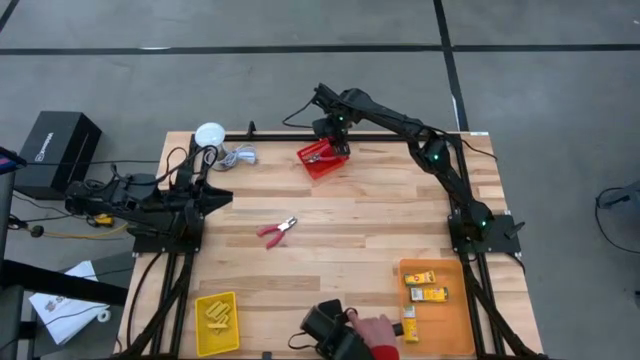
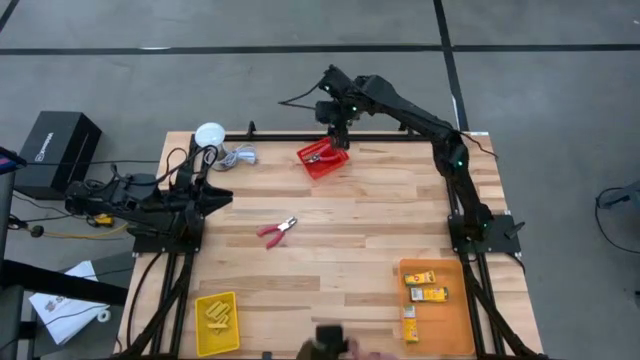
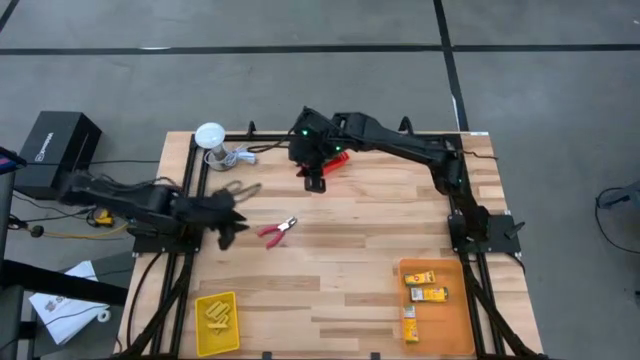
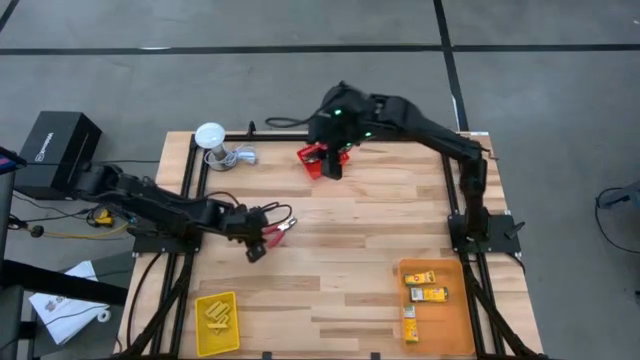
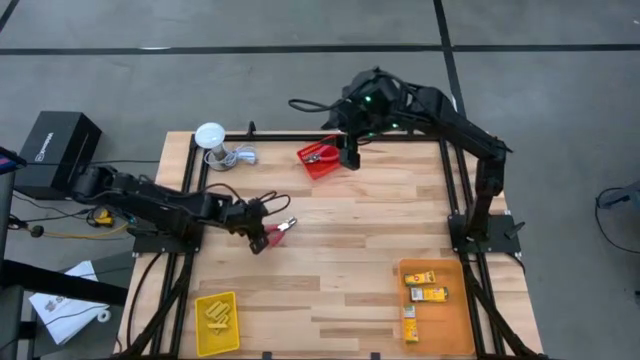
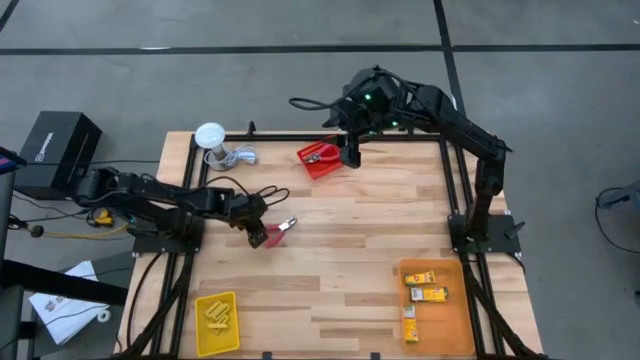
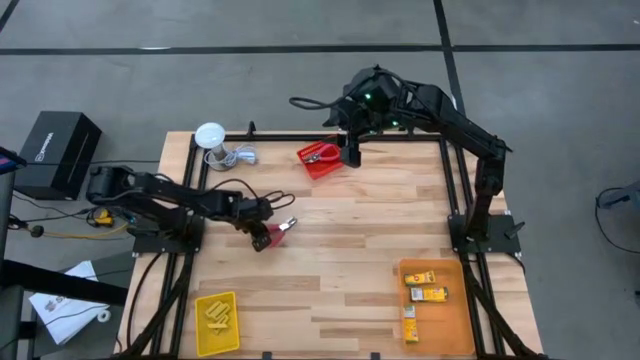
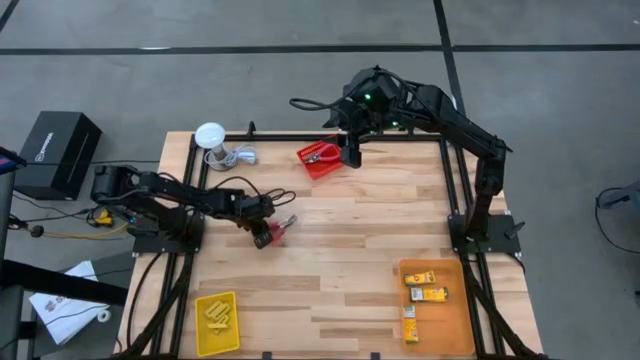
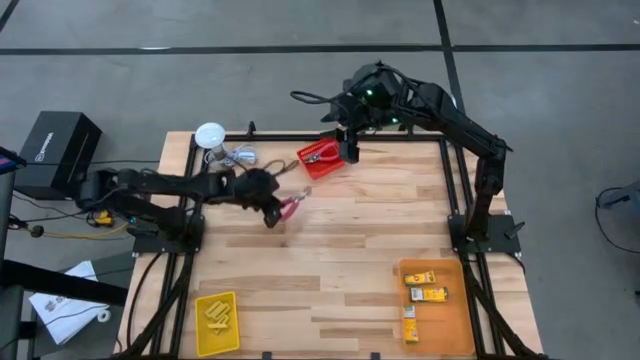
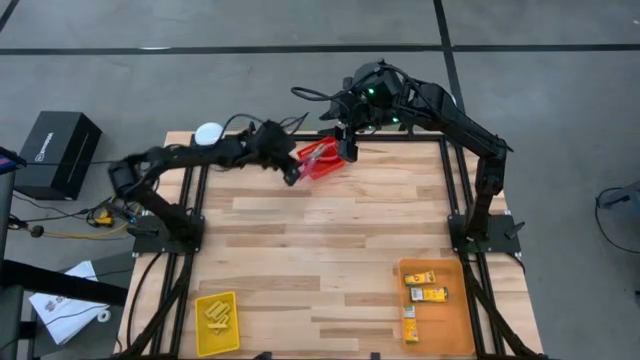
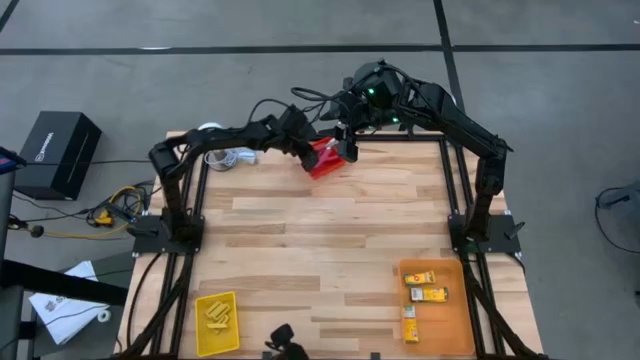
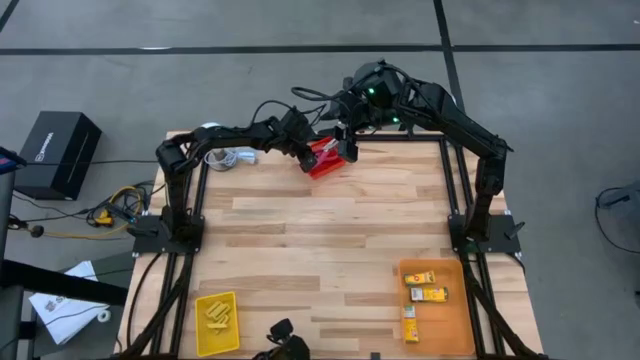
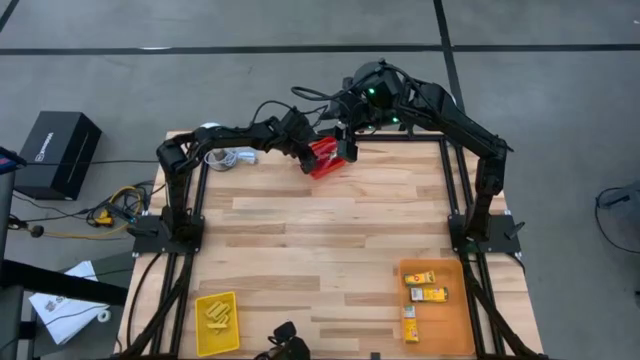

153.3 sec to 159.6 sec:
Task: Pick & Place School Supplies
Put the pink hole puncher into the red bin

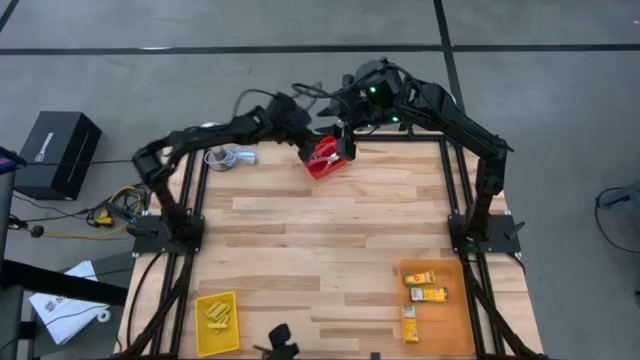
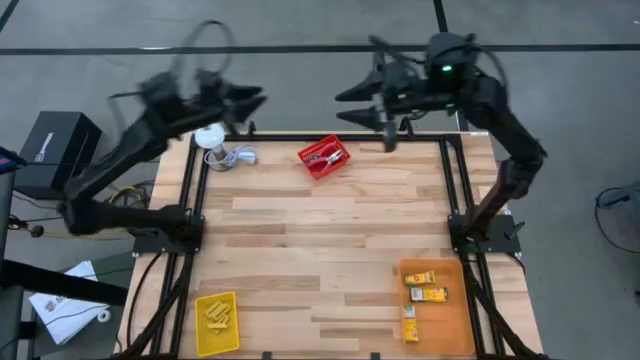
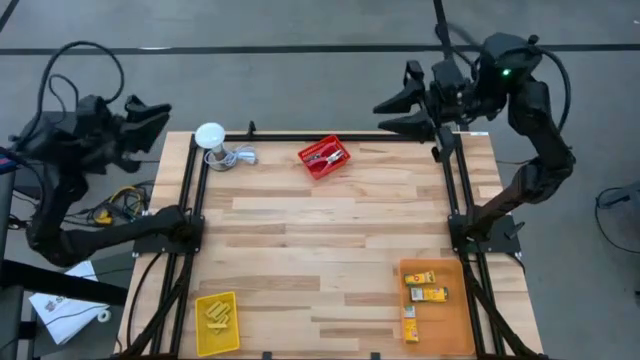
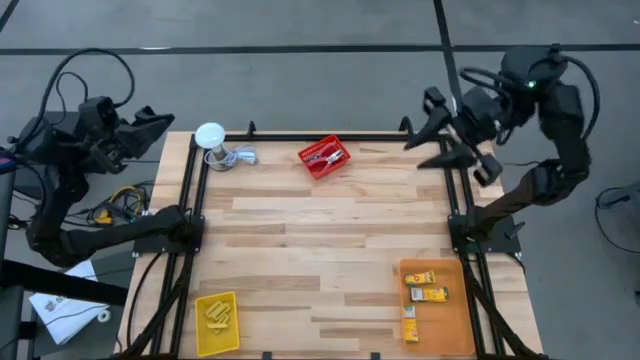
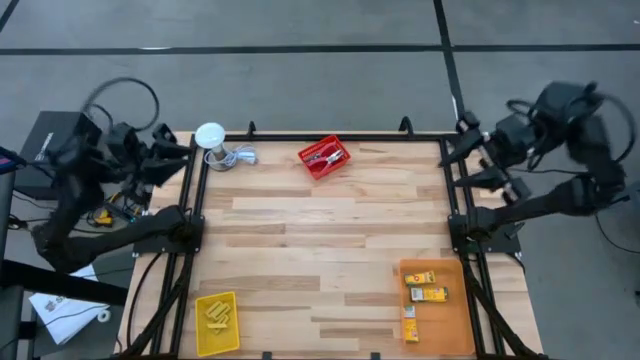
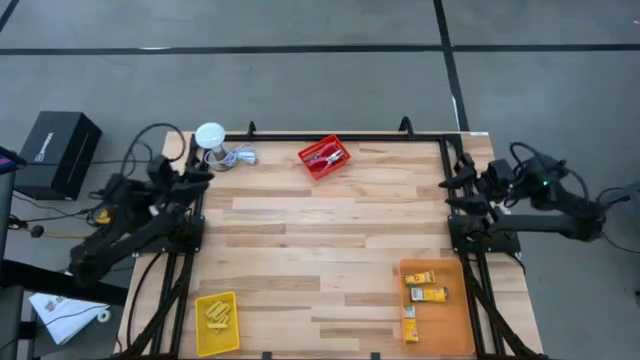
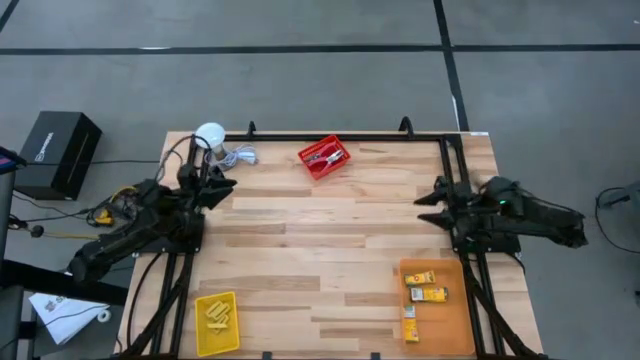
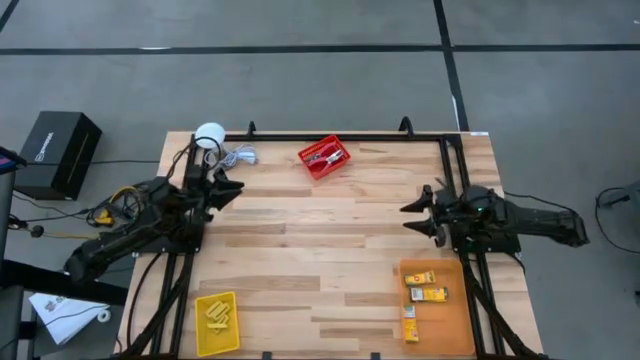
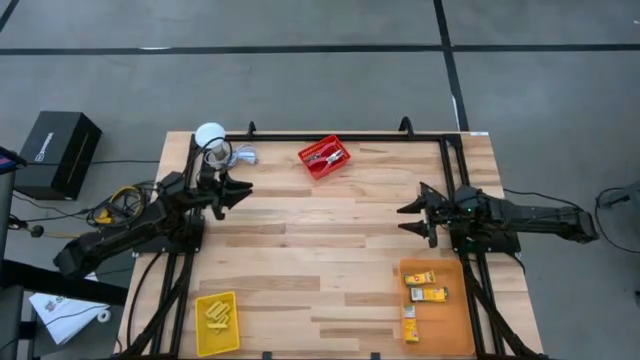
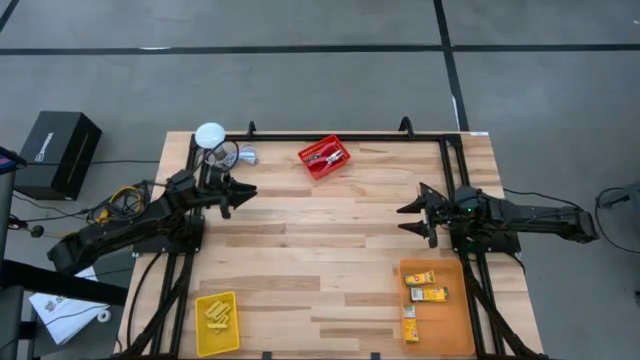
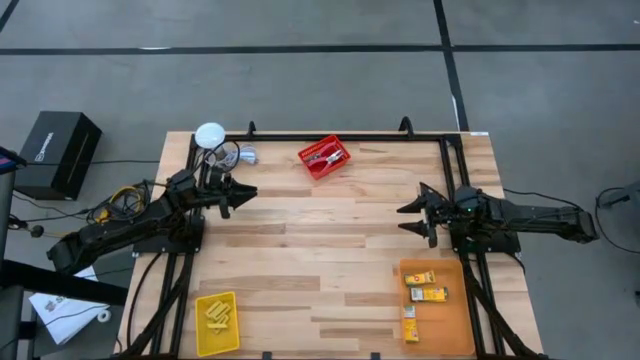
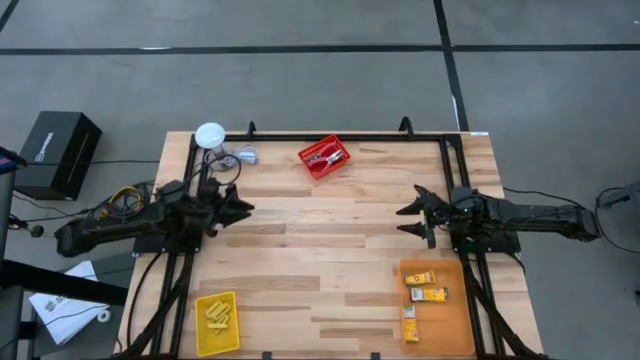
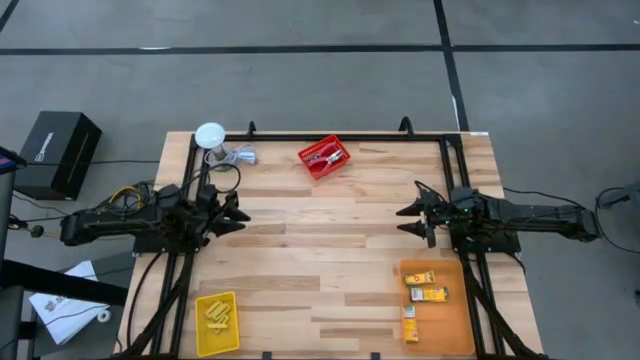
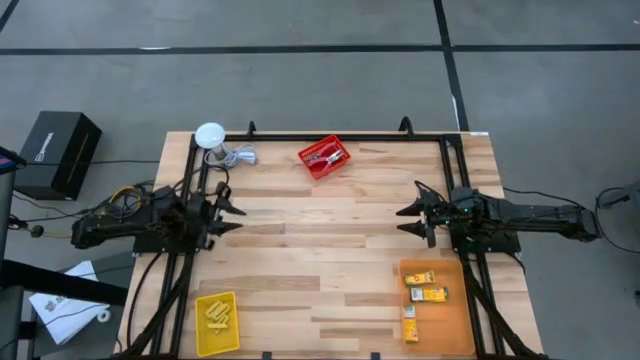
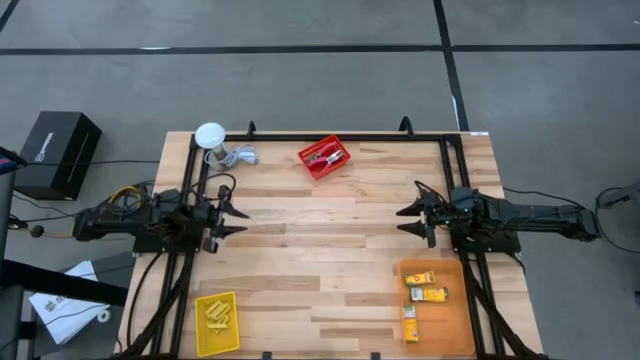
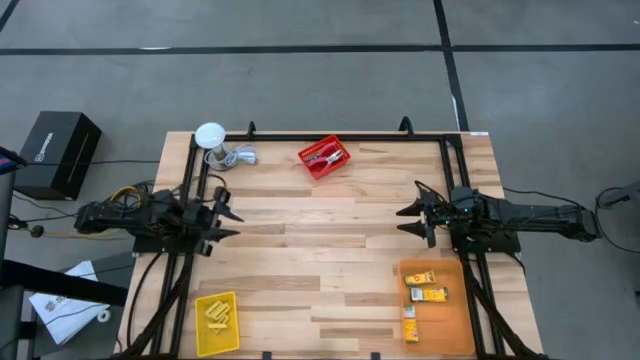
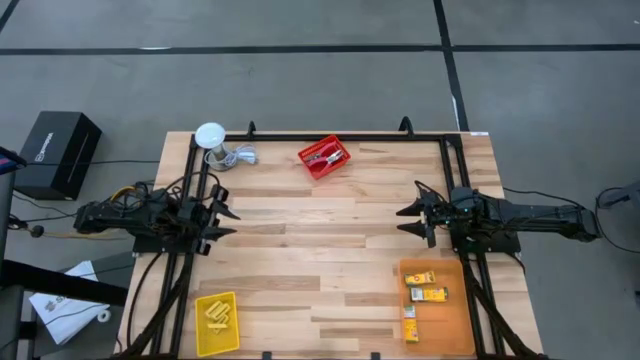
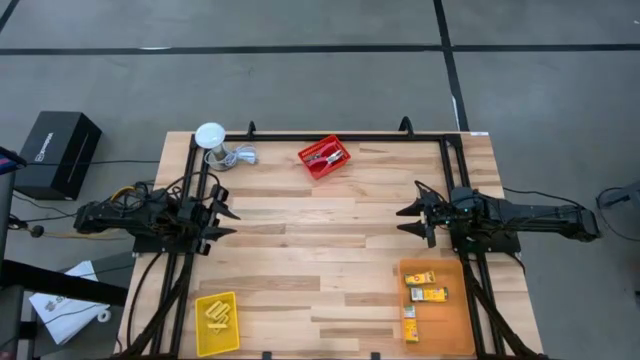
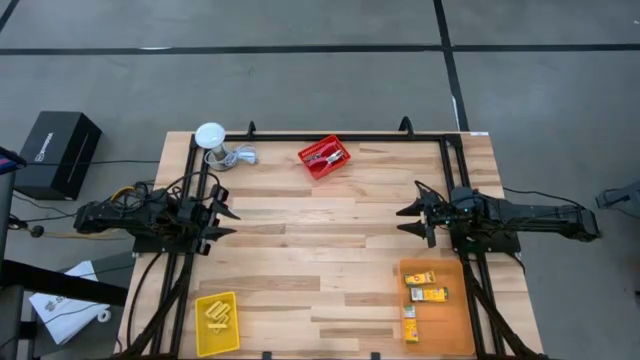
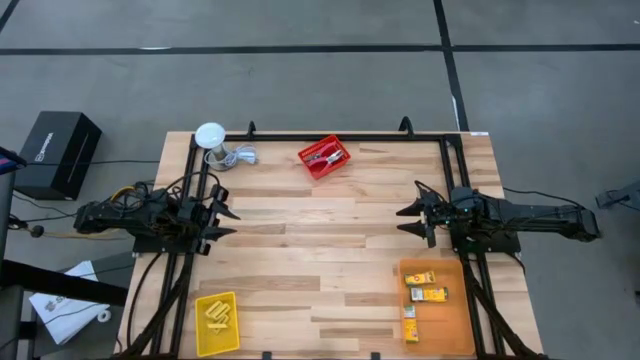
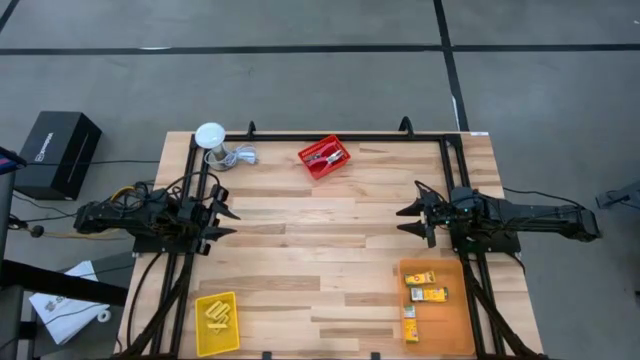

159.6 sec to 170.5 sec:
Return to Home Position

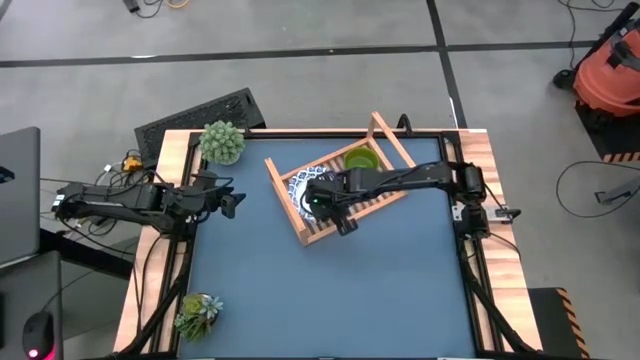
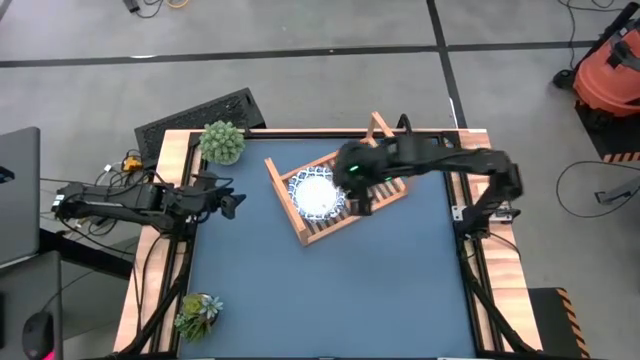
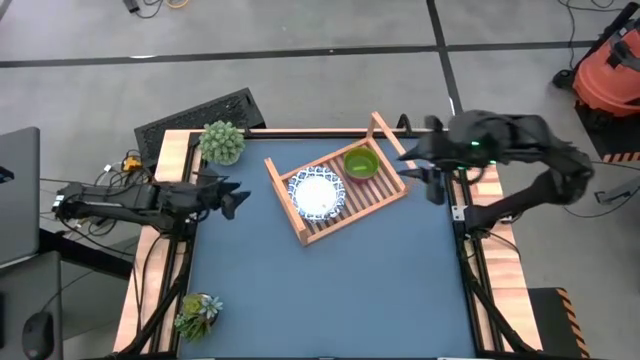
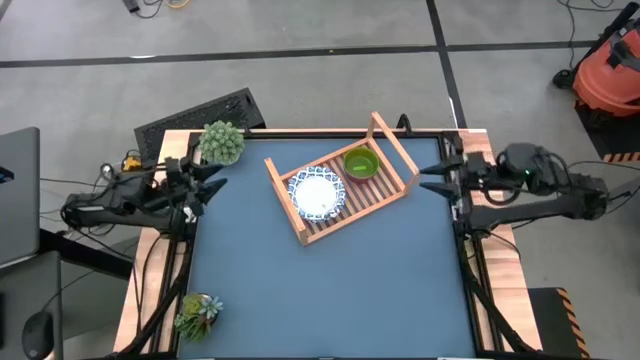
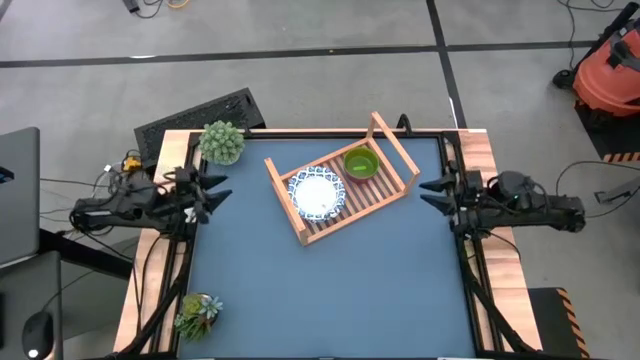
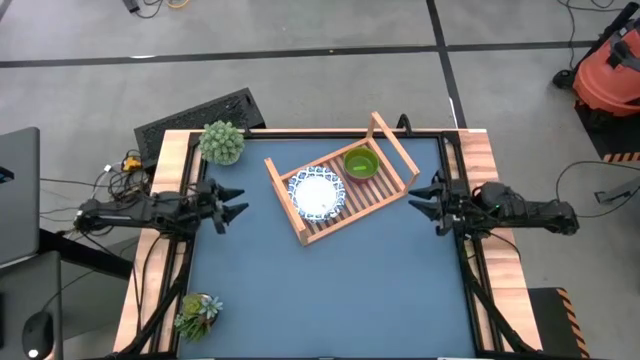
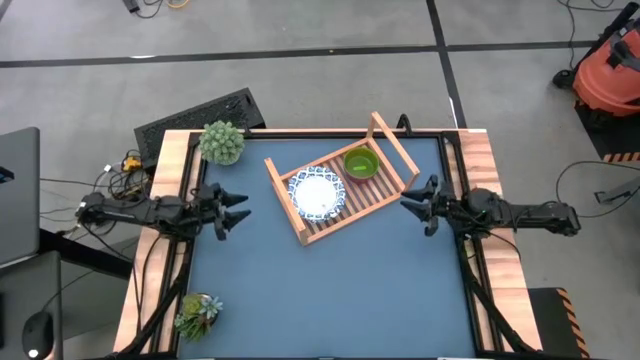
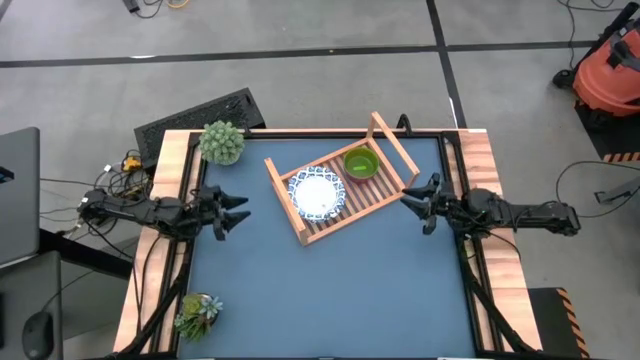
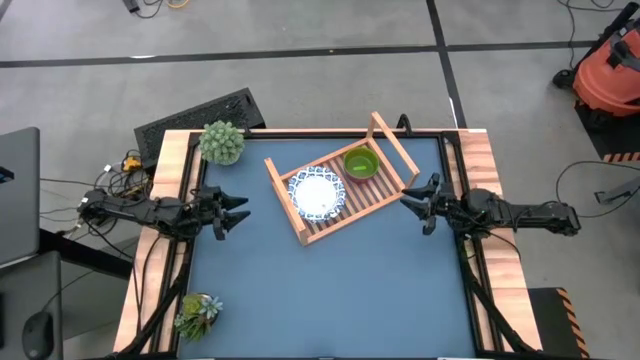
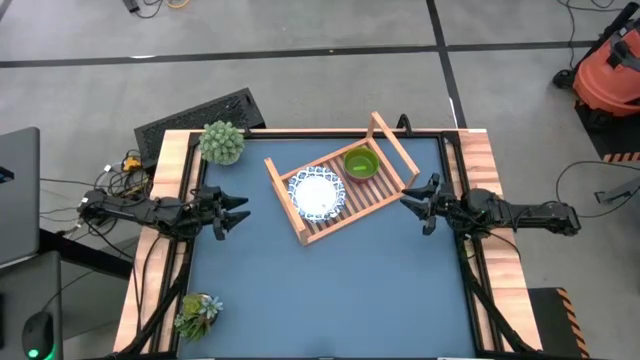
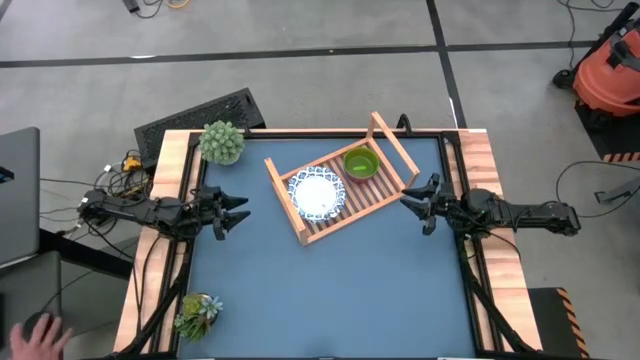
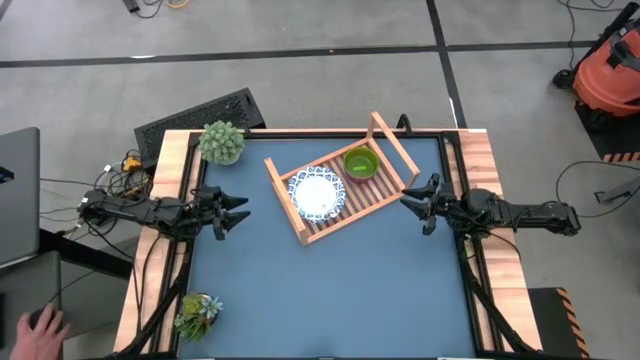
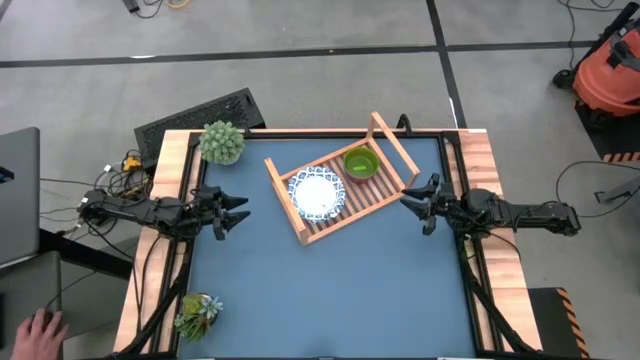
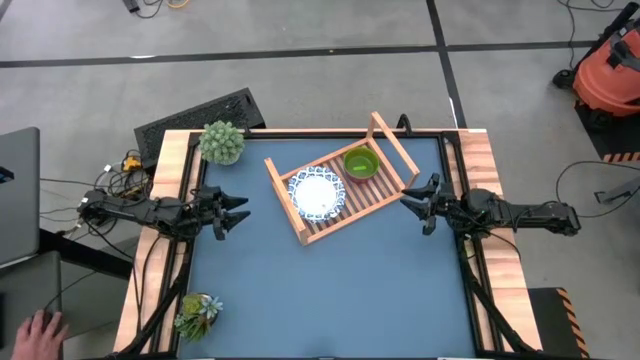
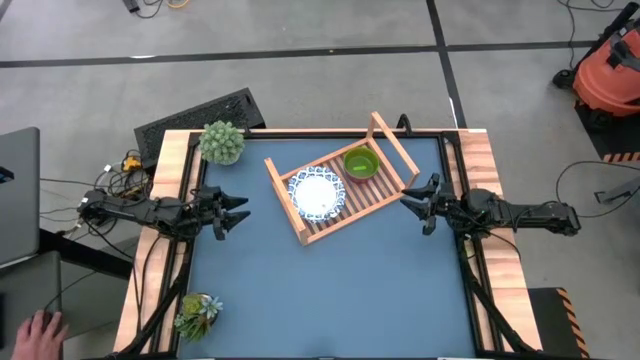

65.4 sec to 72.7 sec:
Task: Place and stack bowls onto a shelf
Return to Home Position
